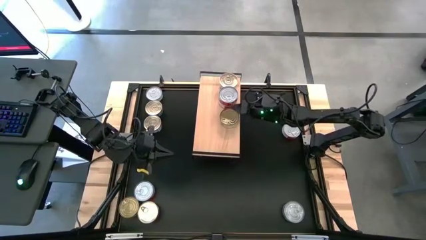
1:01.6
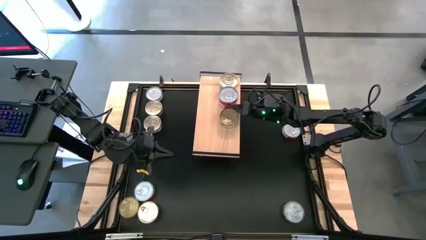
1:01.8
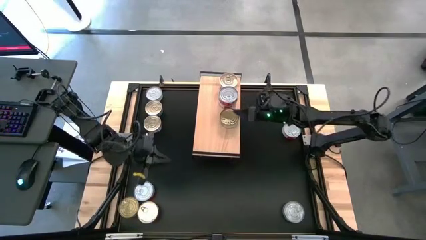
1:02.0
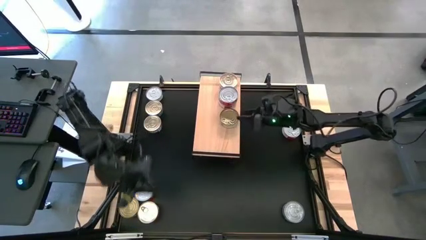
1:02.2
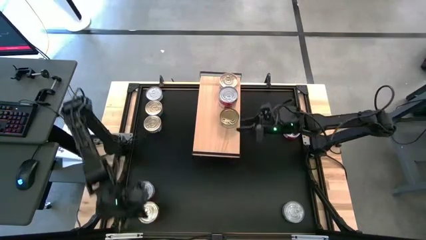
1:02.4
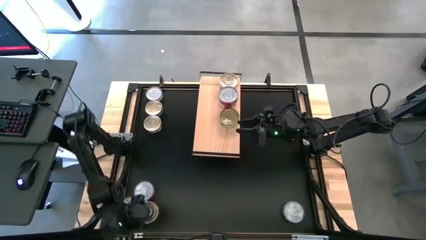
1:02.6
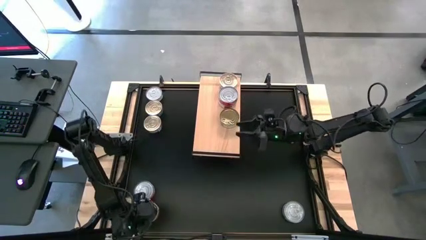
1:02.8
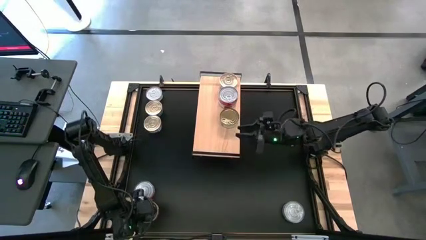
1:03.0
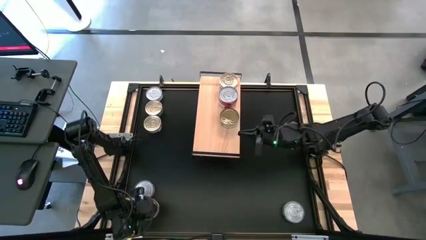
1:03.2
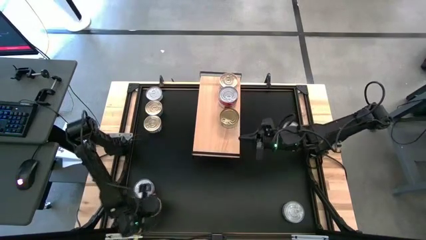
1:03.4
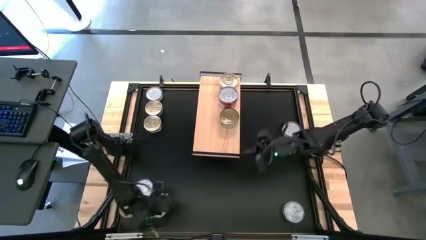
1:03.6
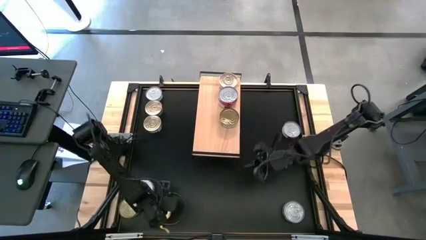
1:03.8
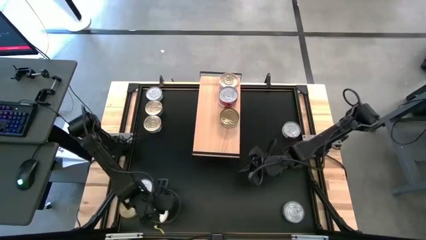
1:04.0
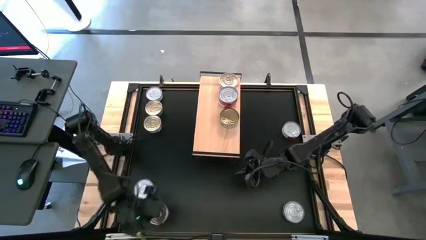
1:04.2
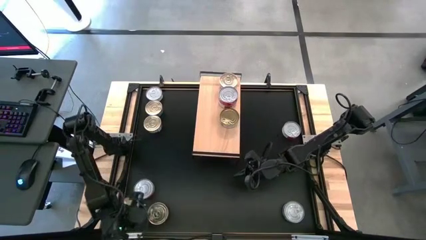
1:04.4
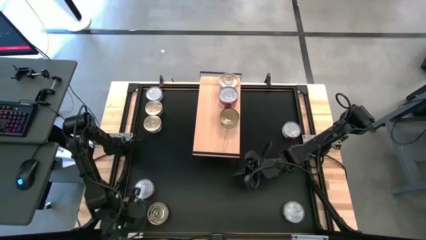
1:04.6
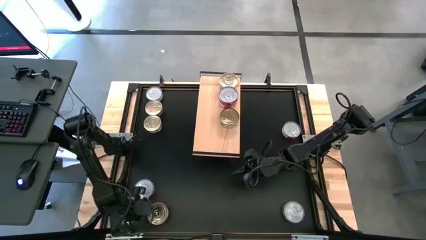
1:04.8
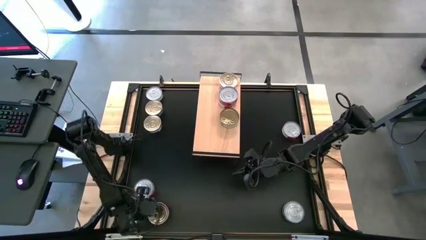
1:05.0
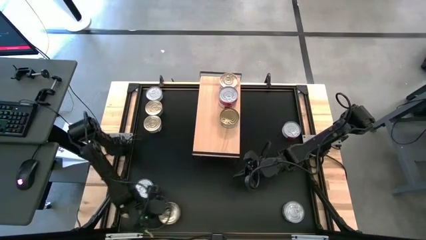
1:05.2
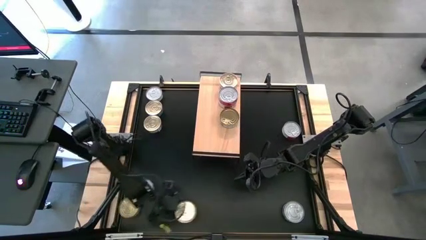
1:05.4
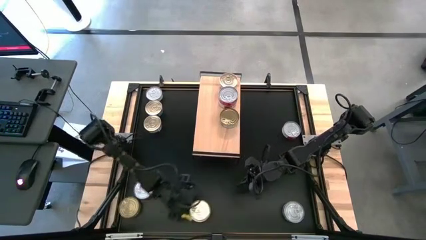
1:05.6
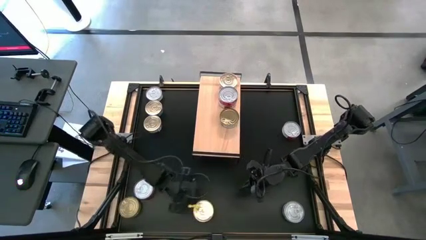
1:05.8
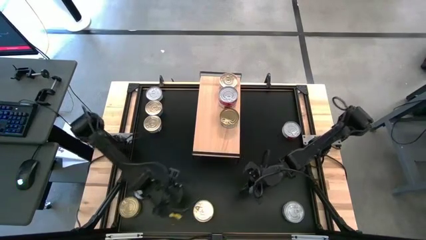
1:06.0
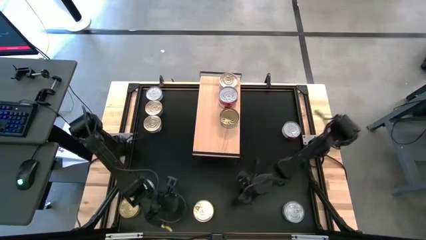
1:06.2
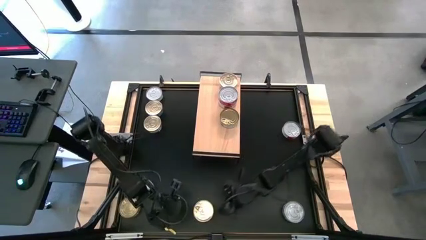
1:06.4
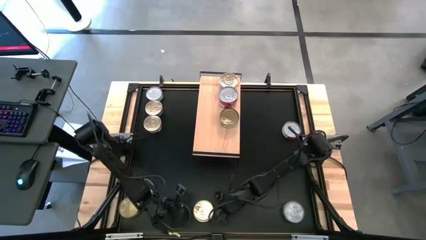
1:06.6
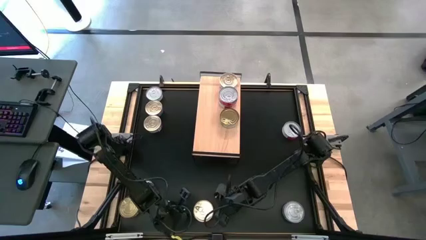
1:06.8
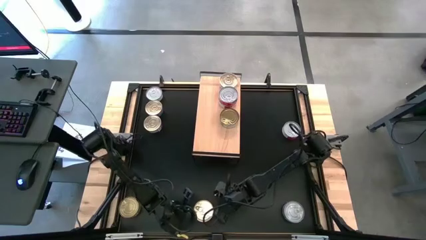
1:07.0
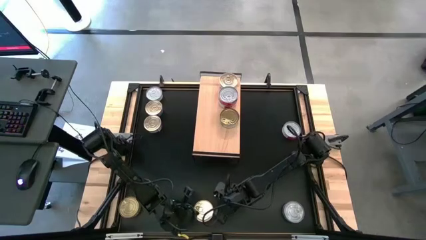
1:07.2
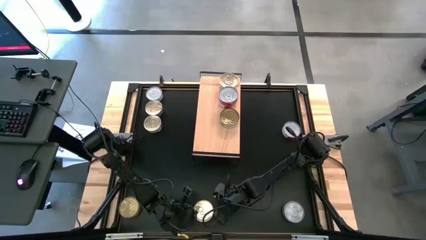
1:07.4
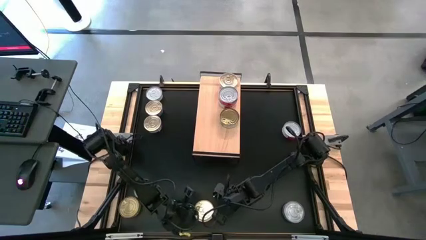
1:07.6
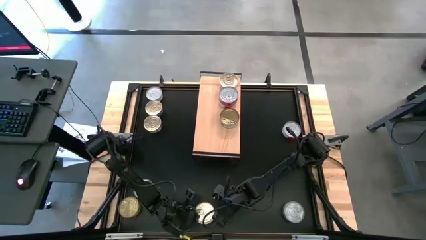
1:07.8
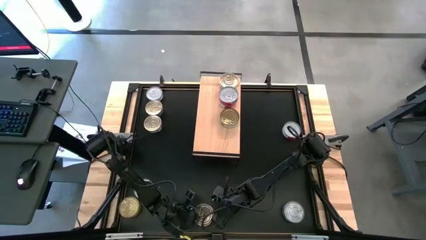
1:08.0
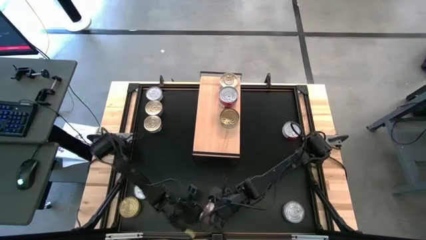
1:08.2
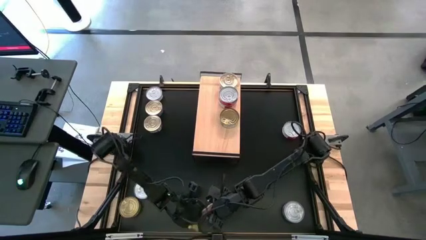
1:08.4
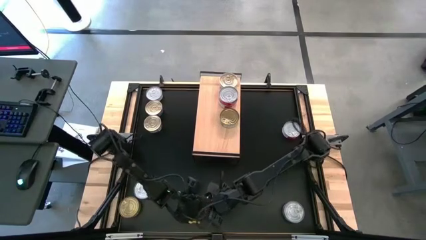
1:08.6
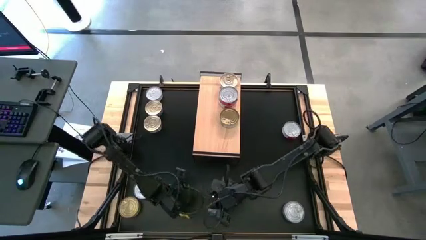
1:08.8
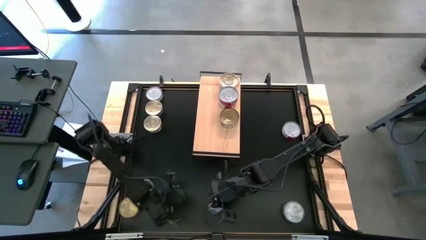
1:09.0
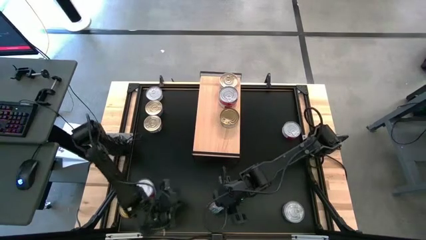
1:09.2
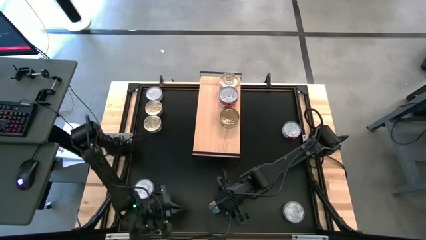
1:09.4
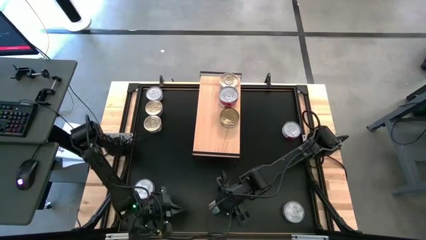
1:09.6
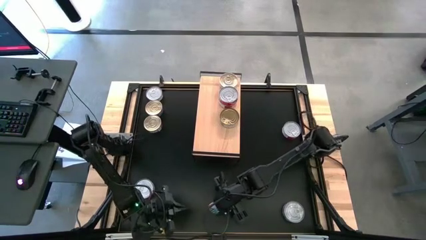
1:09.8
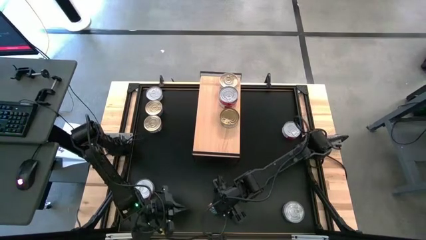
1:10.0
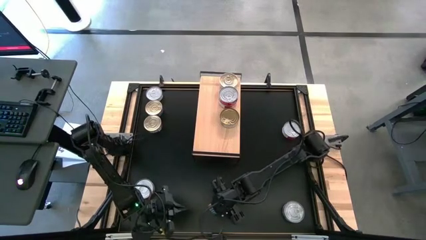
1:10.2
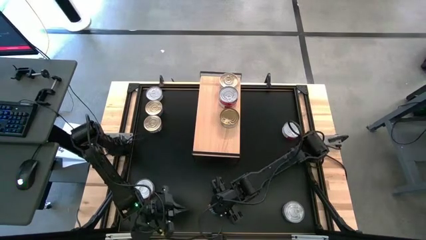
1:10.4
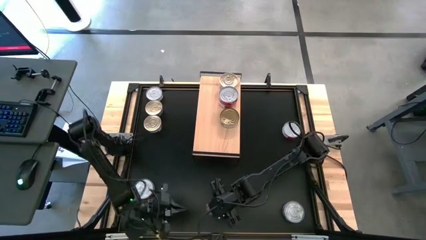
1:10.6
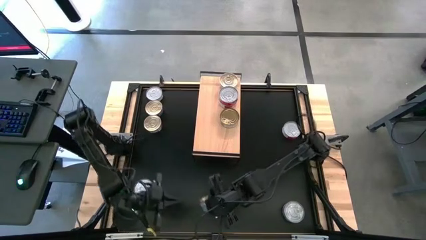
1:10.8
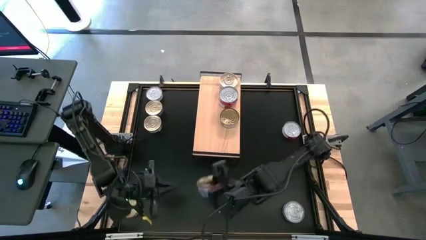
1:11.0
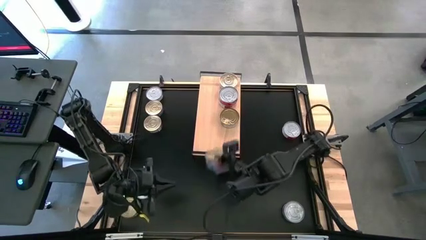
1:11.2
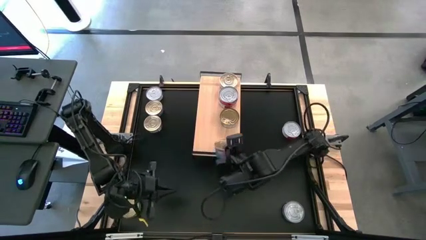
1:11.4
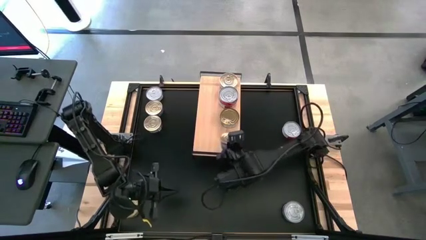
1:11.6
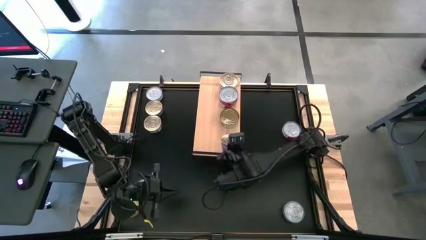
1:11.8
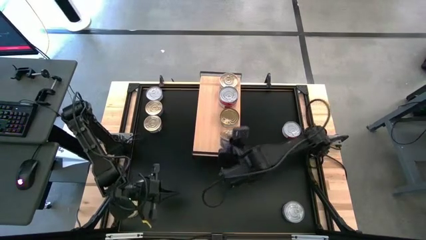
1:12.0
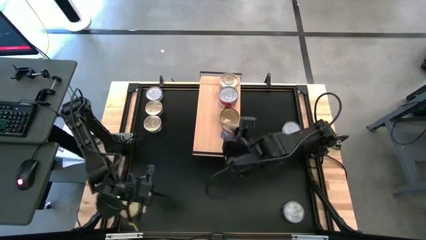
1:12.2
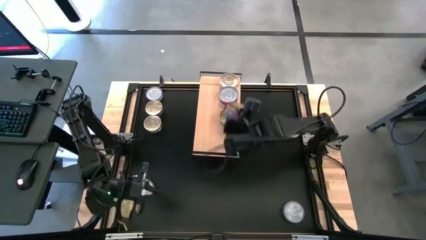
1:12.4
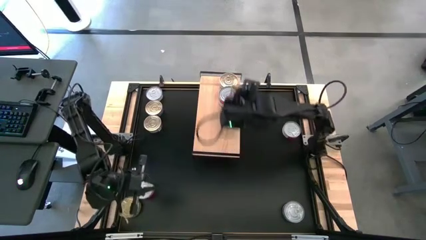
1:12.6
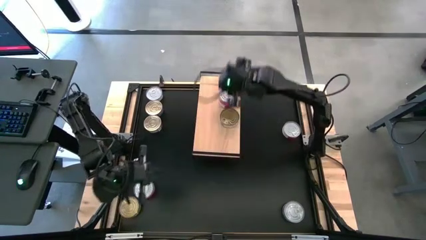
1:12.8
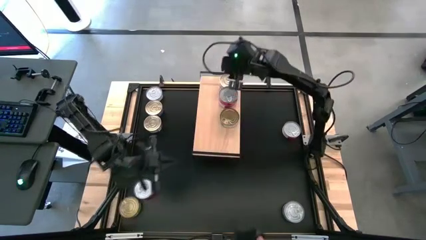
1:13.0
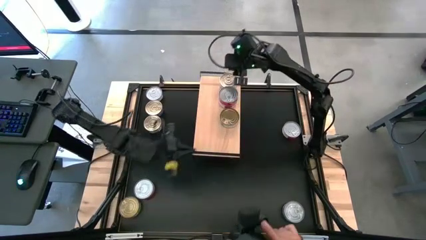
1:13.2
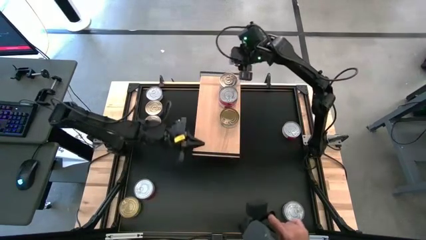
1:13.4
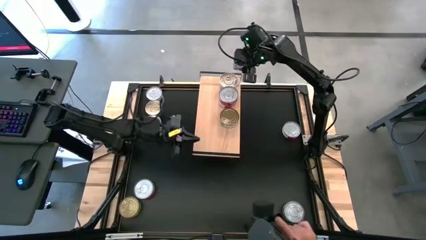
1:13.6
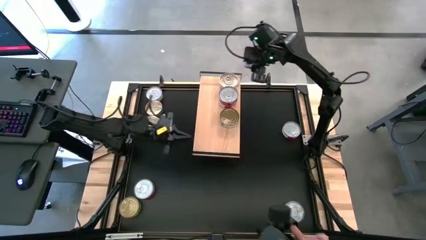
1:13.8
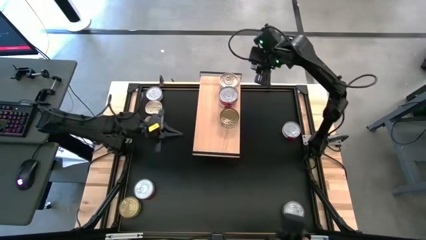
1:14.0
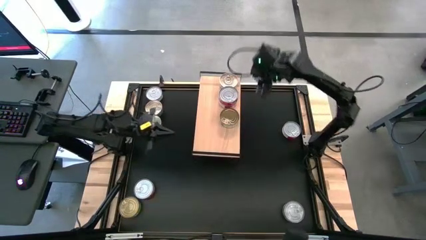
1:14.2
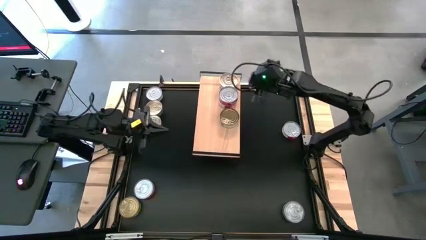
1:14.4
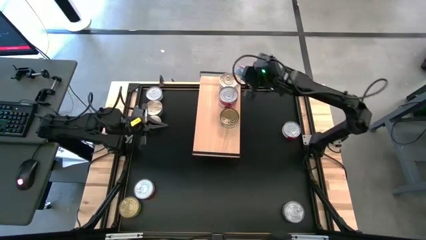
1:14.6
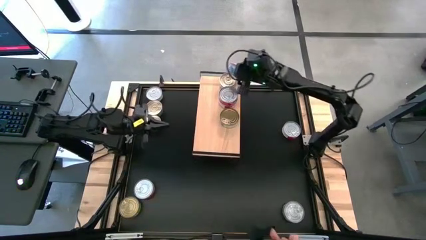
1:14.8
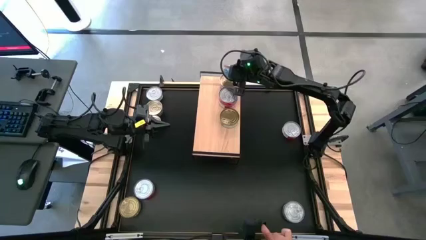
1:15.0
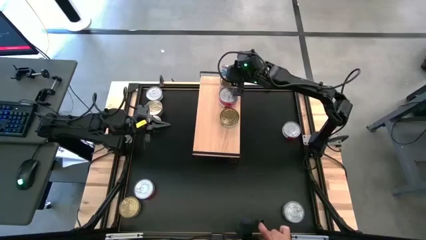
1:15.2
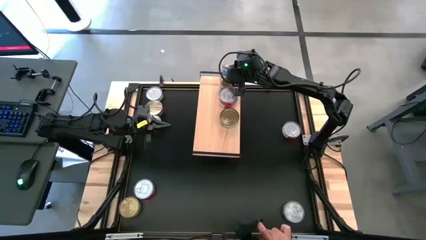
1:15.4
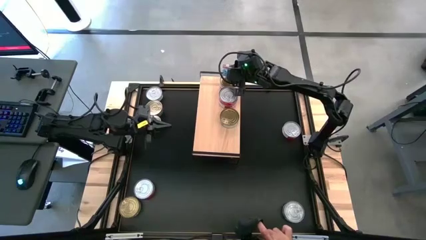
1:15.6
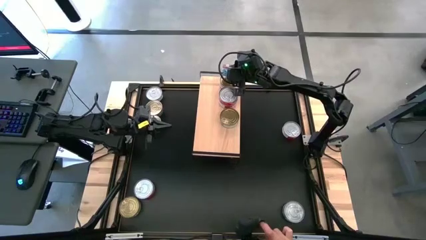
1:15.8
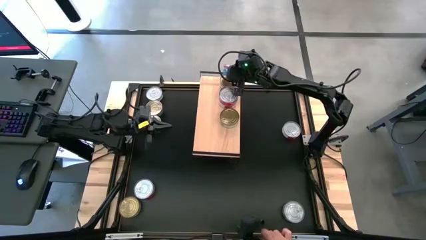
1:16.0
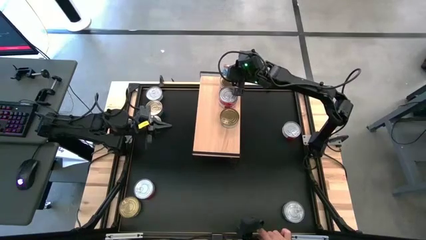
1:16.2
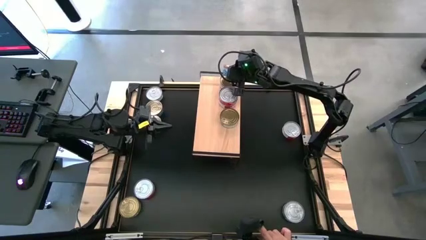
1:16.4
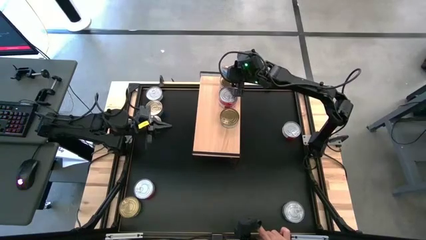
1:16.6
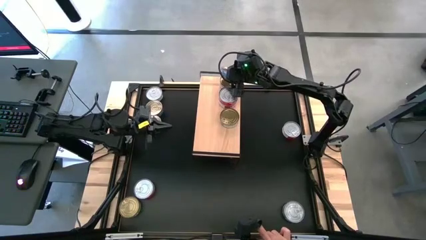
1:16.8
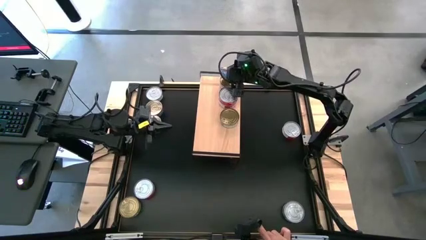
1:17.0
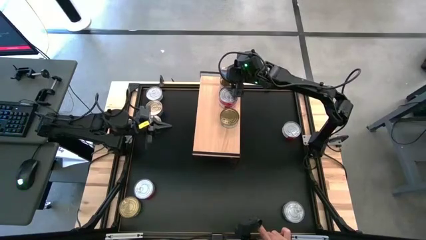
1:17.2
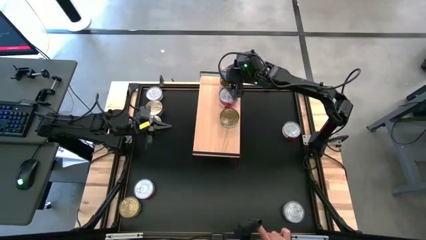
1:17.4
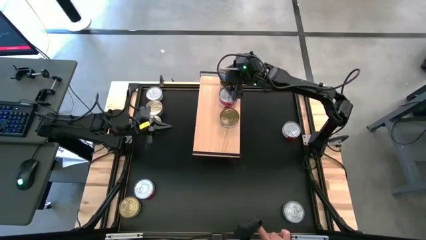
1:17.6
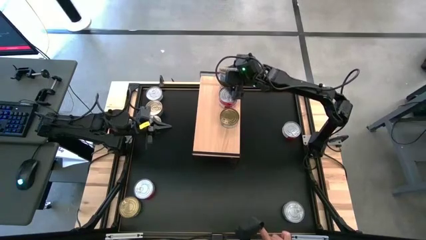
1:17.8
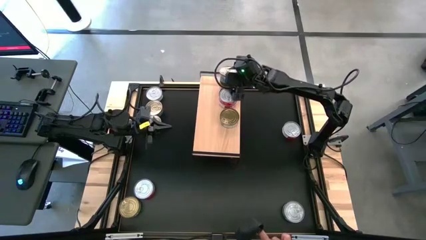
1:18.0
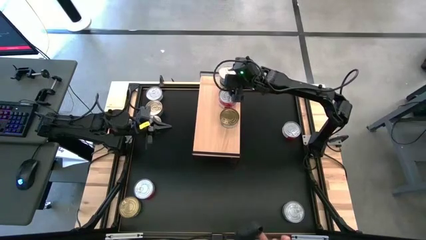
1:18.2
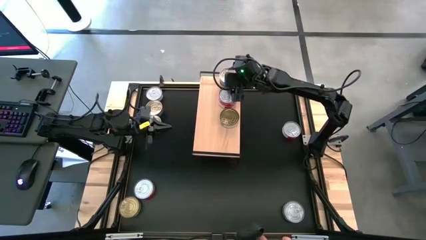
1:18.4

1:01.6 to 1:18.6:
Task: Stack canned seafood by type on shelf
Stack the blue-pink tuna can on top of the blue-pink tuna can on the shelf

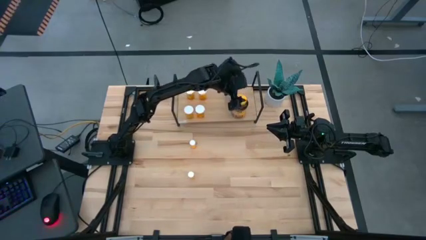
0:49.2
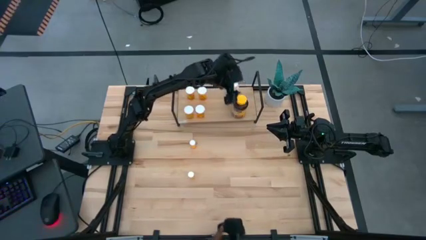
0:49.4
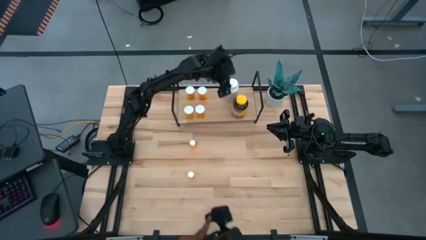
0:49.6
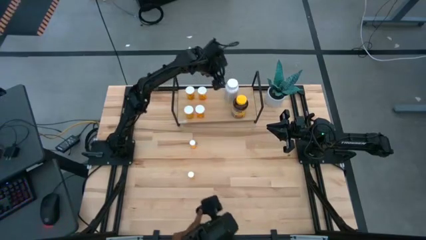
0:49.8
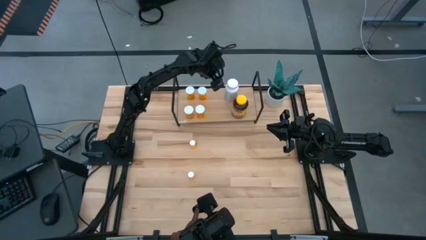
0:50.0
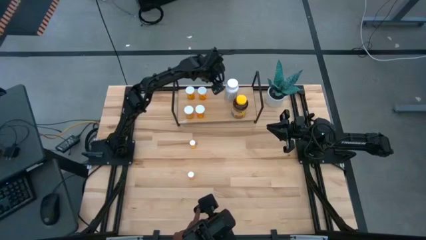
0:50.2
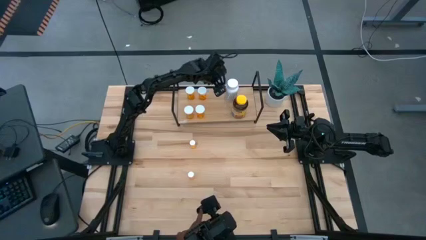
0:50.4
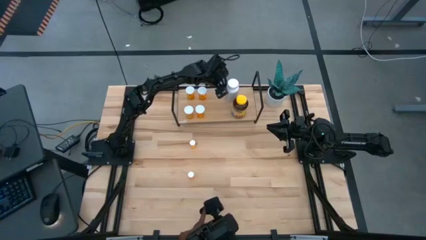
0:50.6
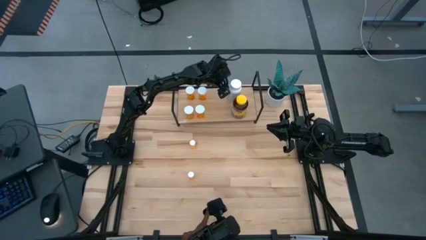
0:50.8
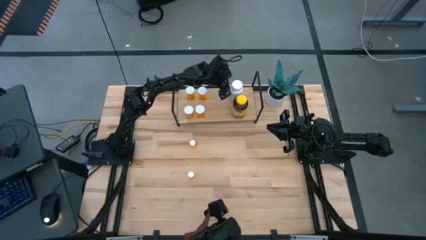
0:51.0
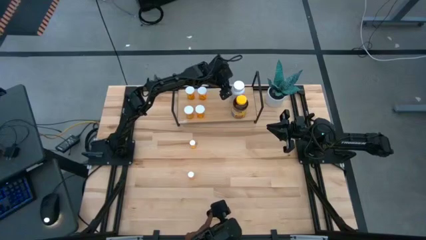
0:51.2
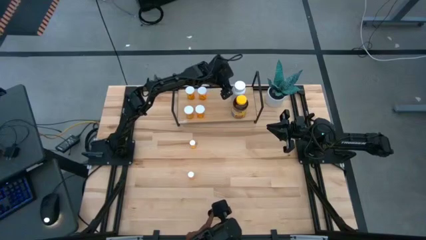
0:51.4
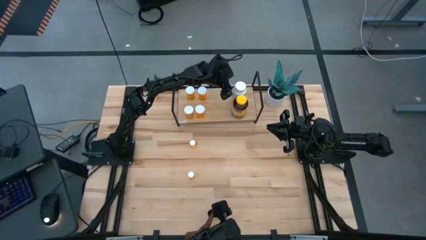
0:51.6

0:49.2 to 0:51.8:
Task: Pick and place medicine bottles onto shelf by color
Adjust the white pill bottle on the shelf
